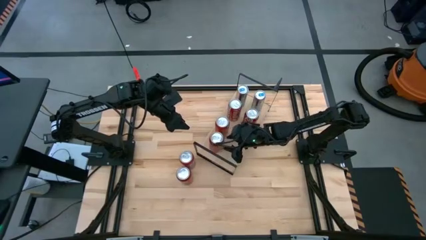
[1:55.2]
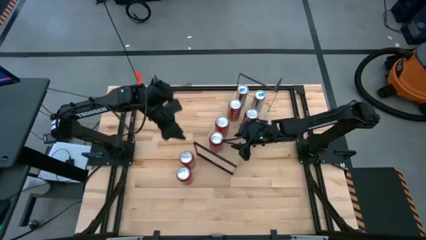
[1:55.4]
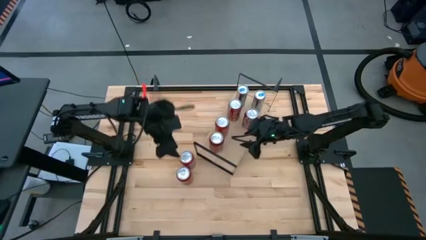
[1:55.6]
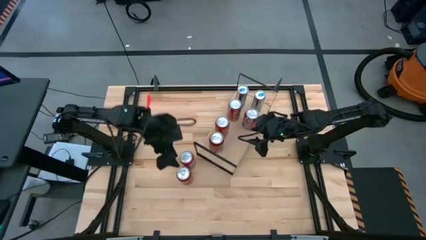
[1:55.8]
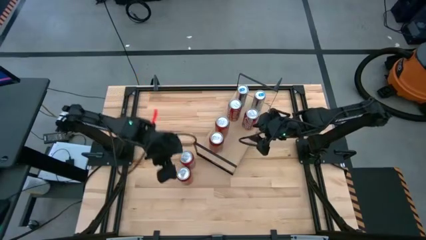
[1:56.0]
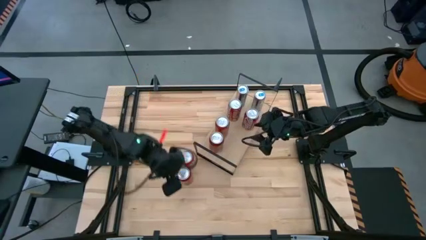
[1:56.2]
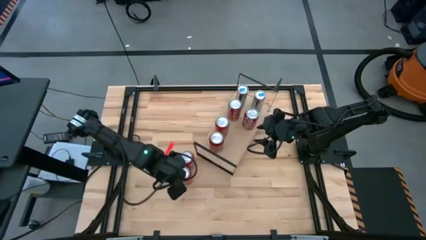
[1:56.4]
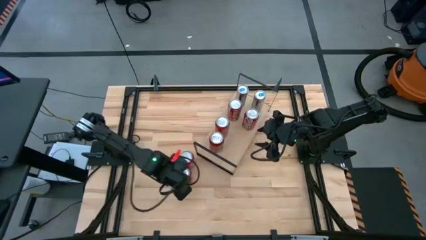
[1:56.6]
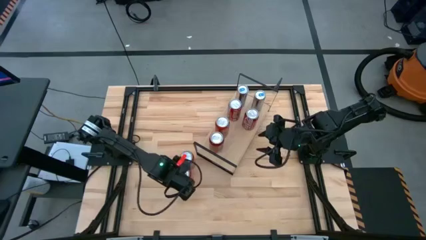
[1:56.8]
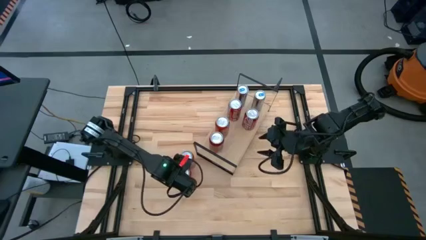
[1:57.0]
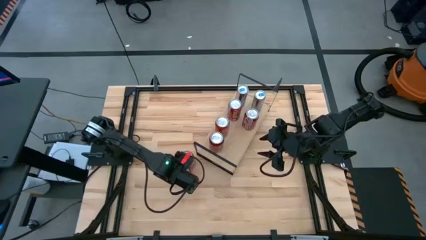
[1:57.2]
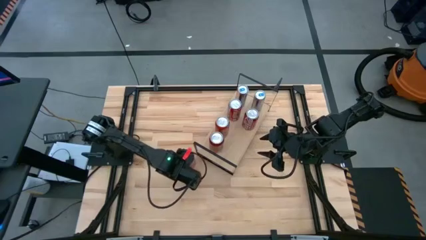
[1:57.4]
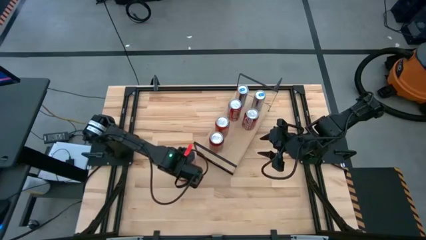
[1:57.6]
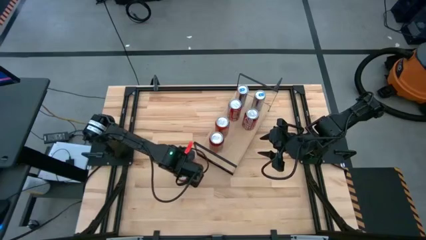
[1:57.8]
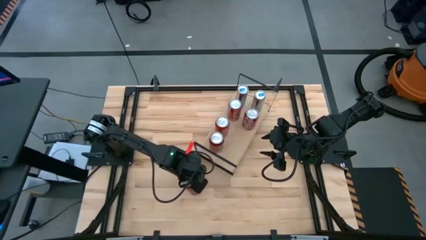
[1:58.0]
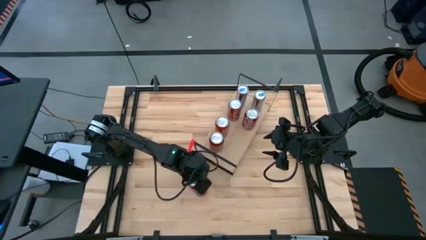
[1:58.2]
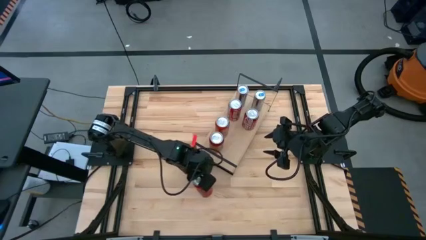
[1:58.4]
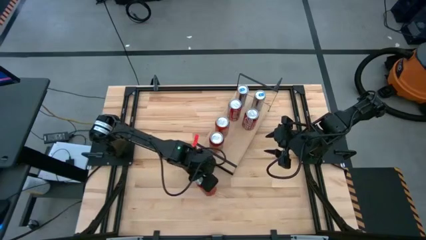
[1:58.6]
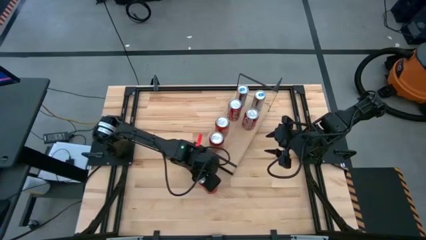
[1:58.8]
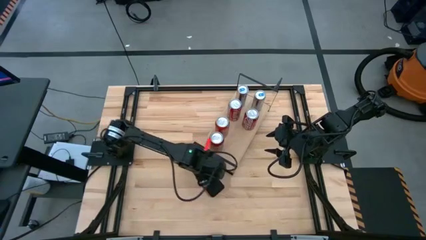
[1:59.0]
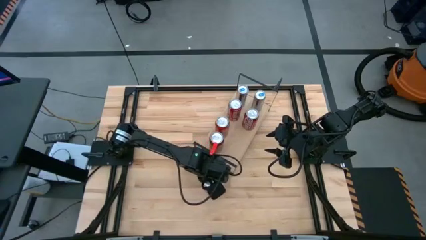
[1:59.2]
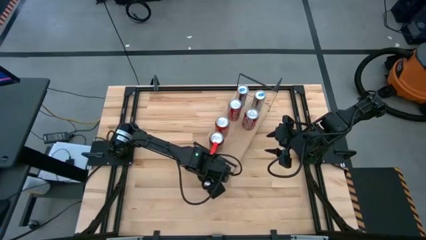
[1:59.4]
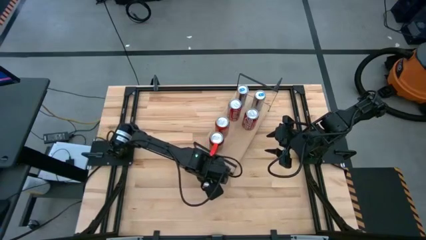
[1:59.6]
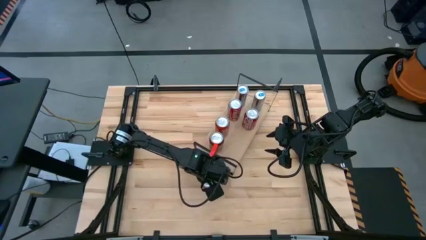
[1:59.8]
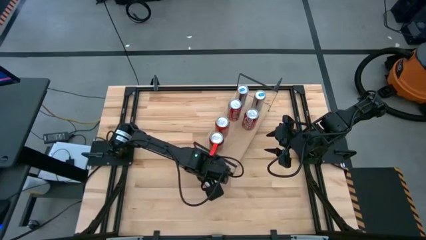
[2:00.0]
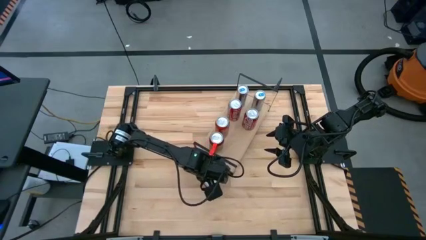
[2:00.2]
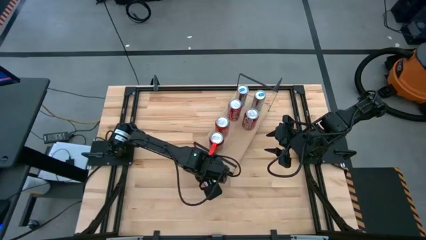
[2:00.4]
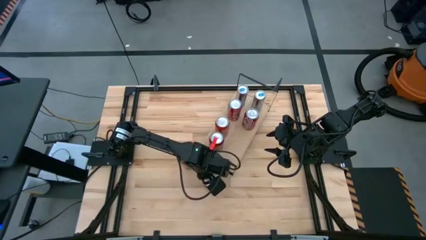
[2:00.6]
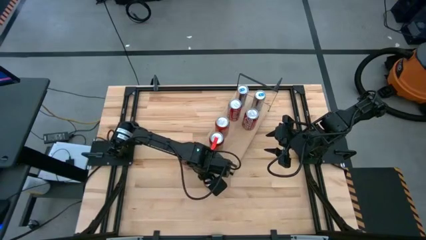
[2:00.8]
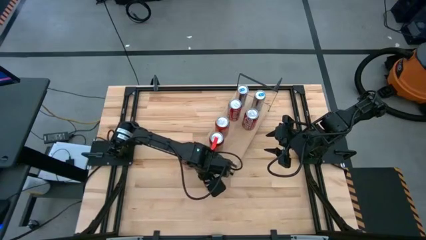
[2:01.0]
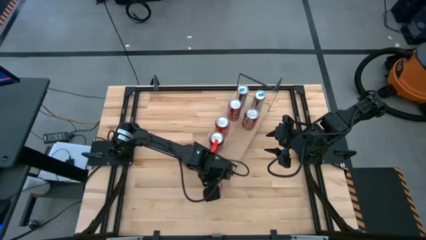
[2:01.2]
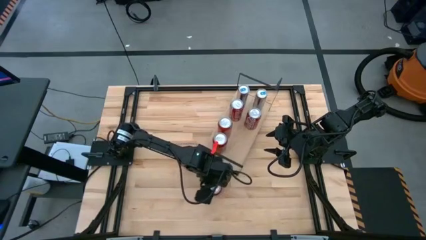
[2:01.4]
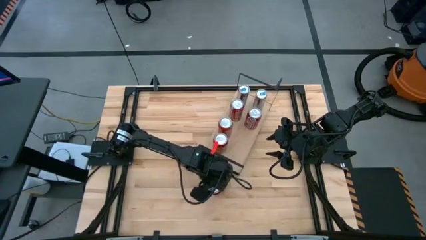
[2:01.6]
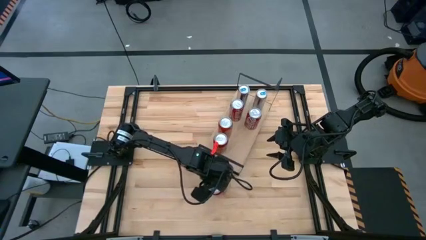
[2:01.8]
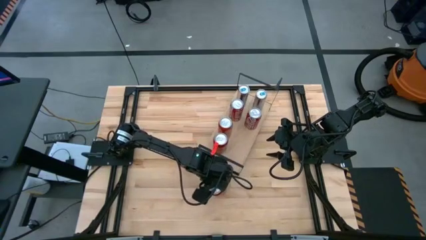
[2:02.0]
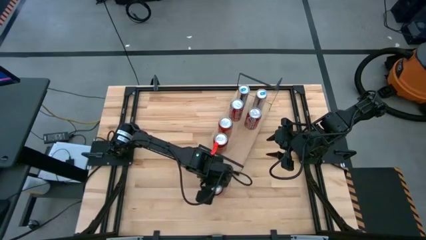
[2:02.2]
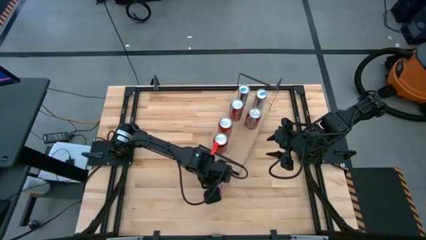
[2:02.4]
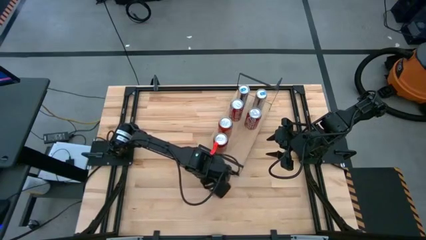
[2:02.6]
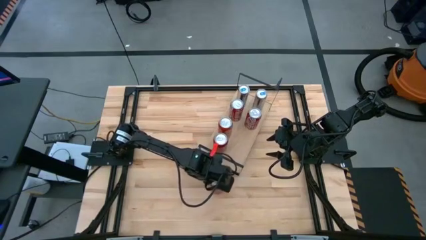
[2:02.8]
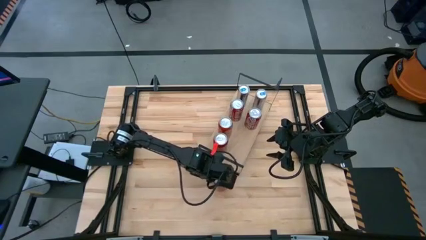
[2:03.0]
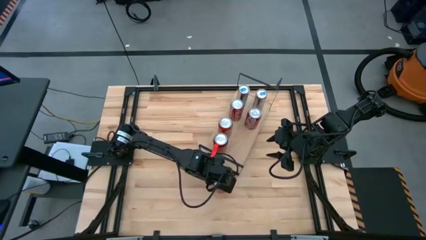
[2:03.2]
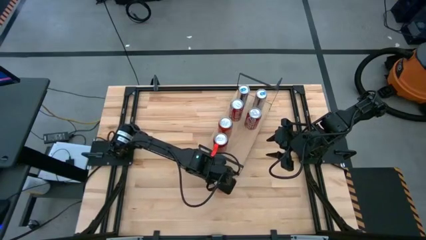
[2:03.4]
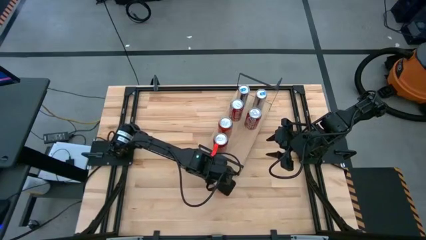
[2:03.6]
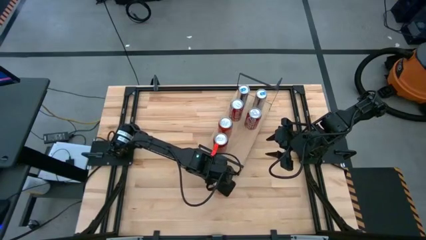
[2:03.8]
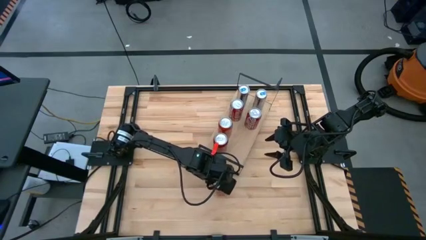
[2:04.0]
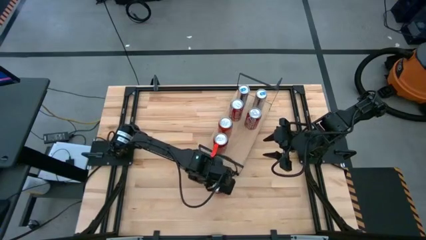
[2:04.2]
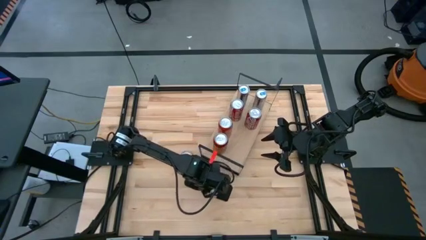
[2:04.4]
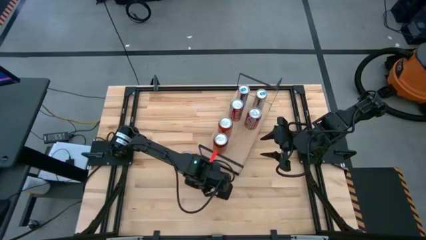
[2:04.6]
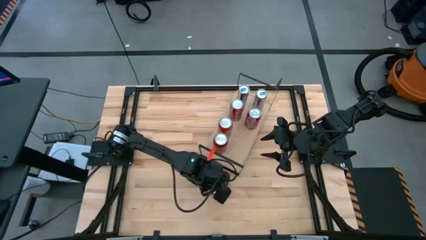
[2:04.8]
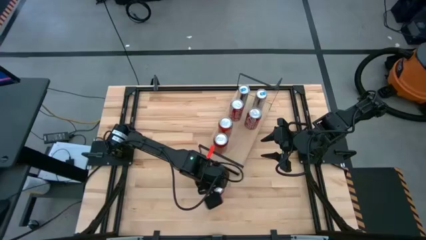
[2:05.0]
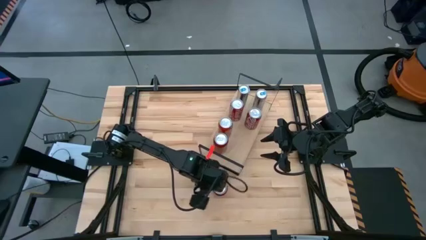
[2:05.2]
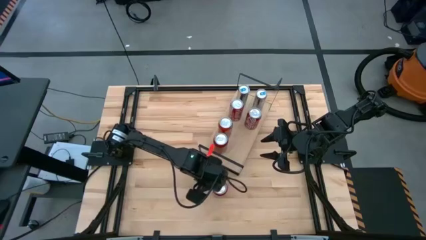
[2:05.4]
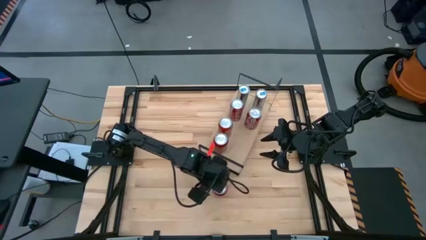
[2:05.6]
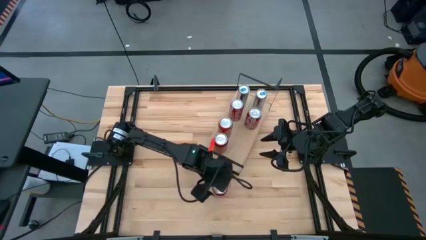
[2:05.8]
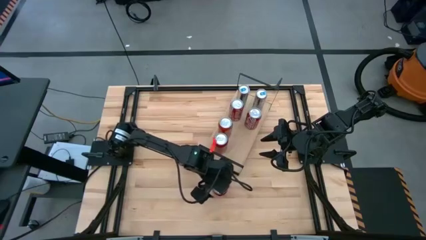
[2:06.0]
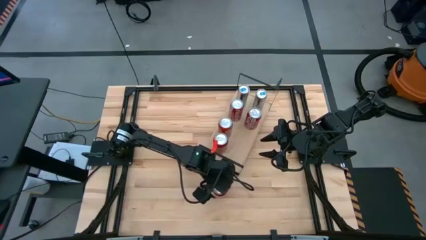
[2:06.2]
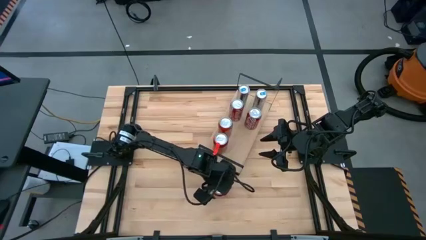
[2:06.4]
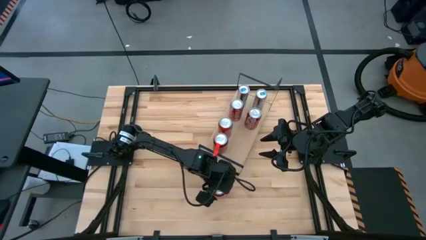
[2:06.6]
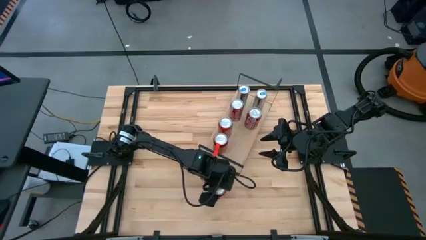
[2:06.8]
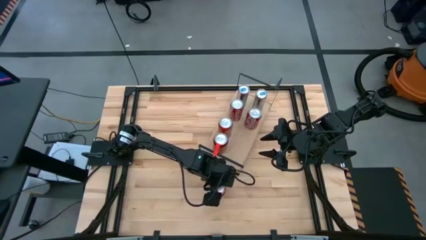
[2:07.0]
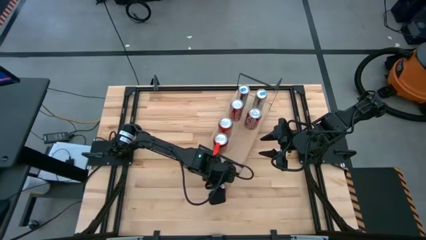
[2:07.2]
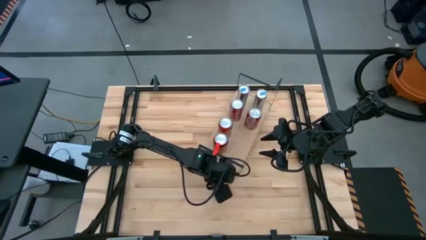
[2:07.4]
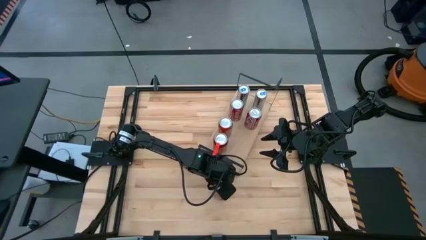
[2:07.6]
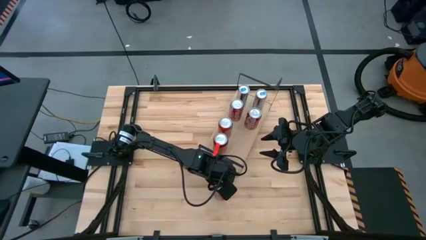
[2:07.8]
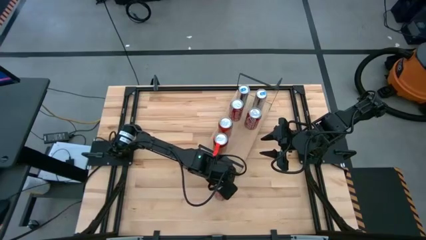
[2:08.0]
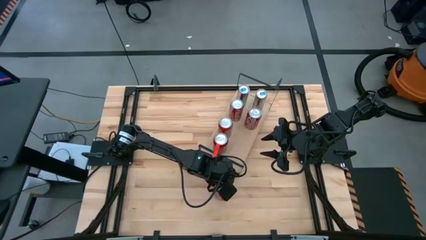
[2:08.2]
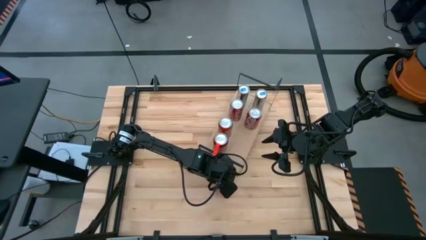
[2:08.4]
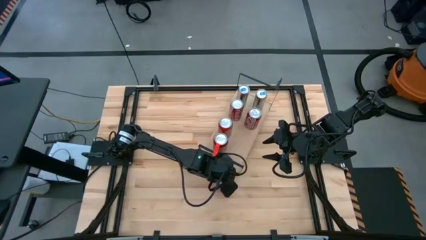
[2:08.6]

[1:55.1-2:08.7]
Task: Place canned beverage on shelf
Put the red-black soda can on the shelf aligned with the other red-black soda can

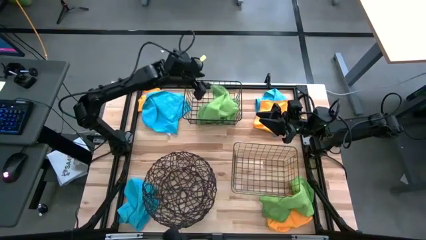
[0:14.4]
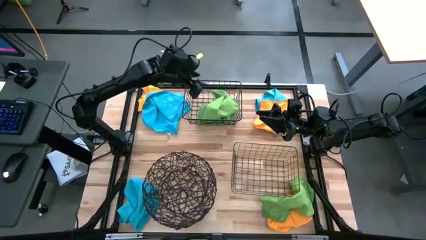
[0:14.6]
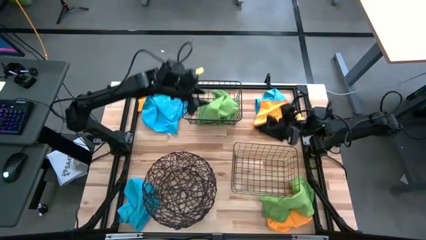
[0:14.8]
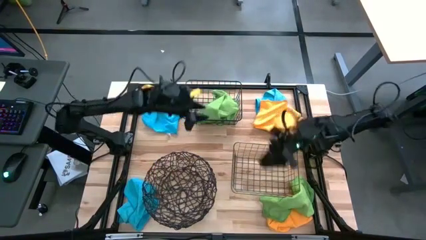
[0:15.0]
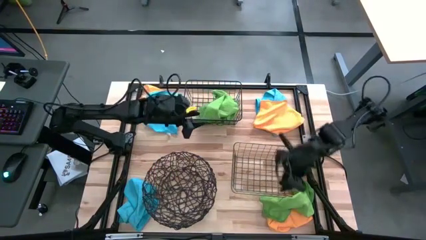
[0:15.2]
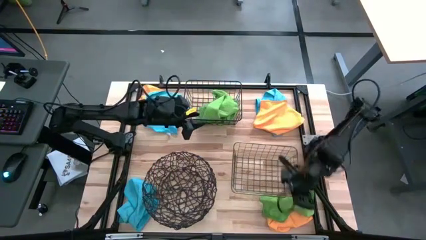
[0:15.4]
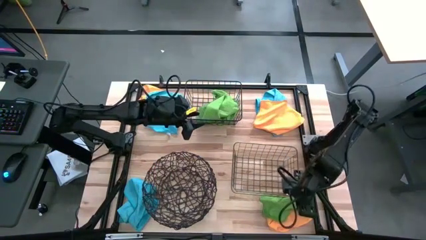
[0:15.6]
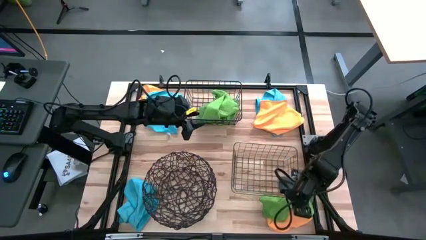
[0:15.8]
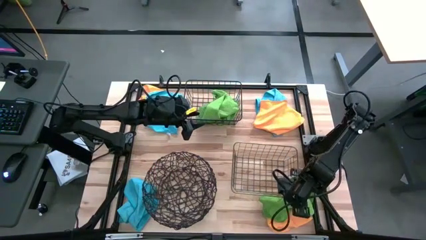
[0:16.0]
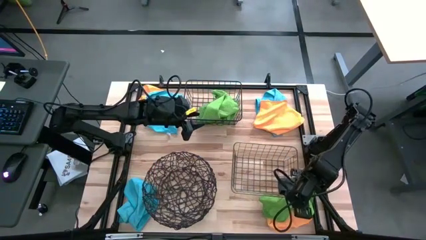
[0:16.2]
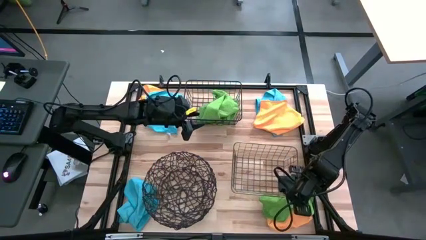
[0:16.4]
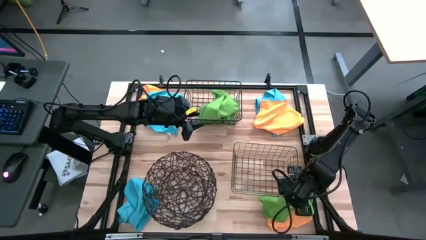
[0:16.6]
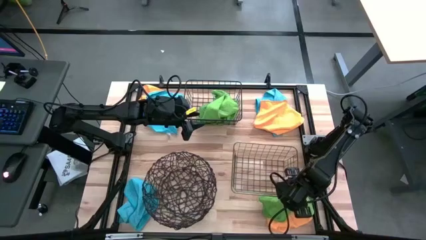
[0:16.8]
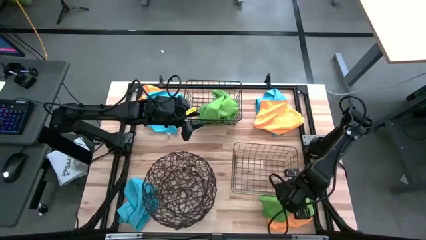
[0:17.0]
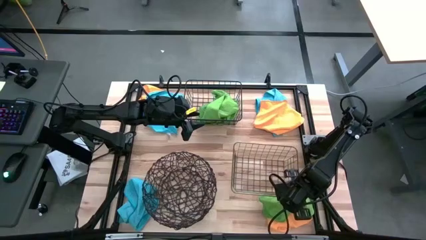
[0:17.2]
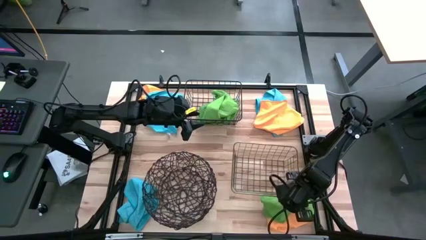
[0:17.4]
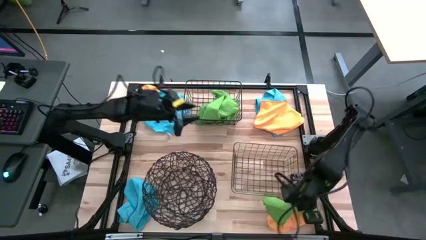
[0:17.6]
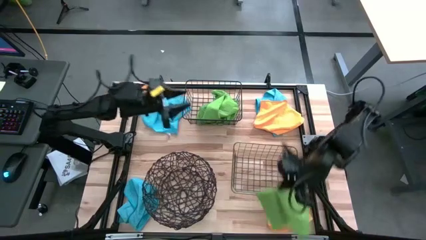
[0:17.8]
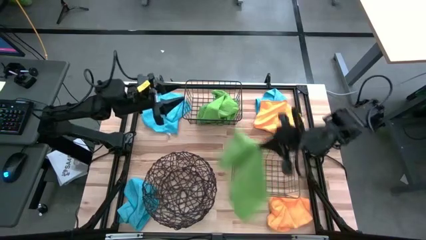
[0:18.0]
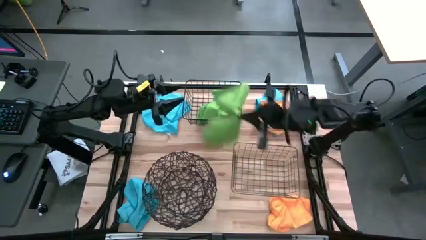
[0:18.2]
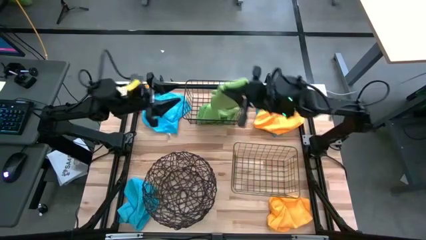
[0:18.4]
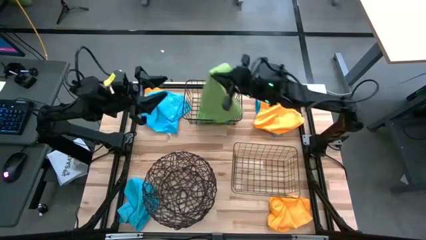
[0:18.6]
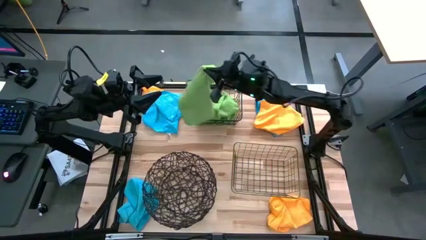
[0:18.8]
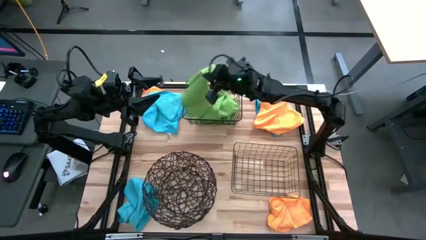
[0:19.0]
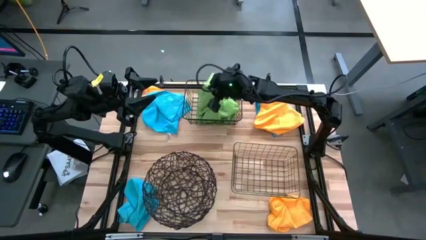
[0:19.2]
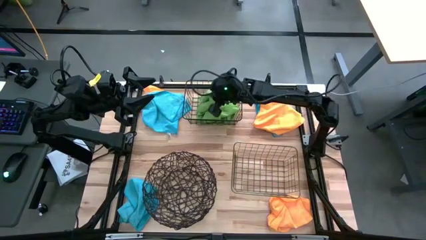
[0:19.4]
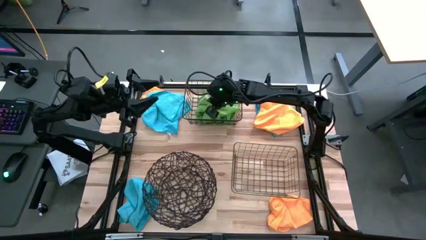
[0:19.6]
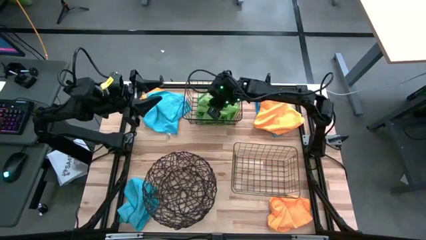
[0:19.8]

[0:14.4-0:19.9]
Task: Sort microfiber towel by color & place in baskets
Put the green towel into the top black wire basket
